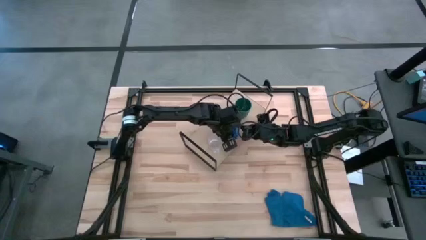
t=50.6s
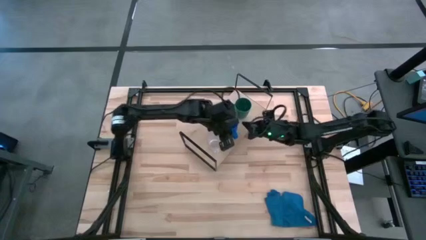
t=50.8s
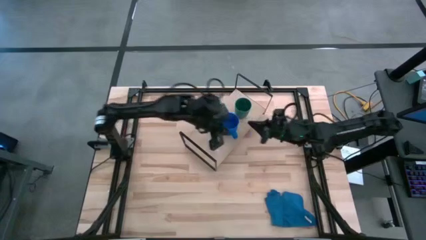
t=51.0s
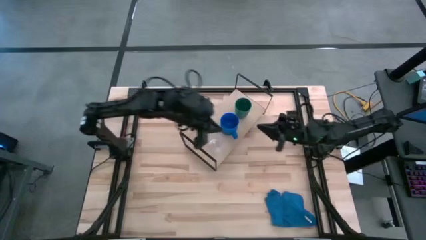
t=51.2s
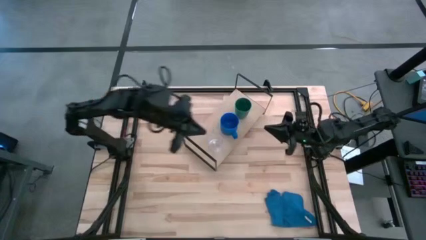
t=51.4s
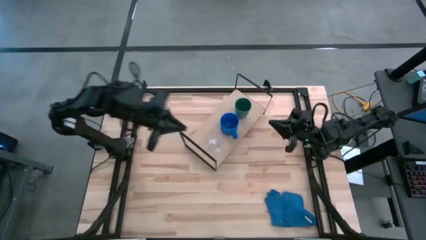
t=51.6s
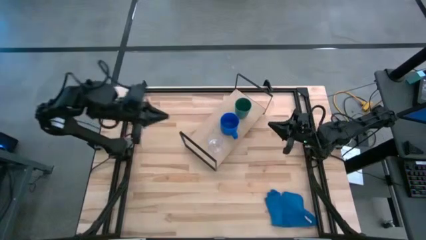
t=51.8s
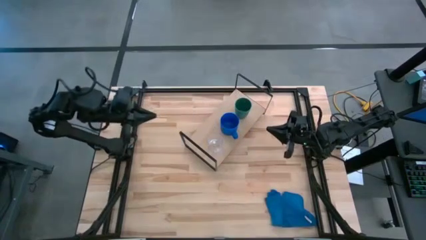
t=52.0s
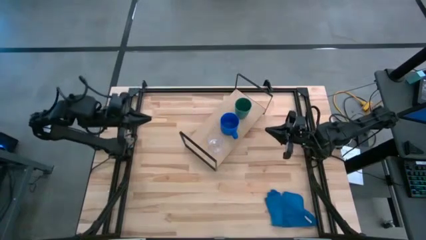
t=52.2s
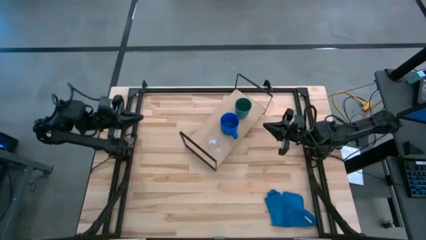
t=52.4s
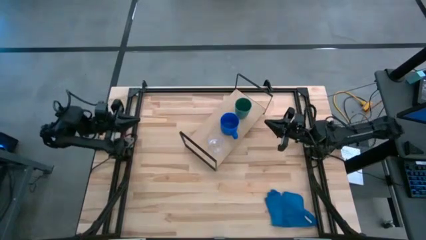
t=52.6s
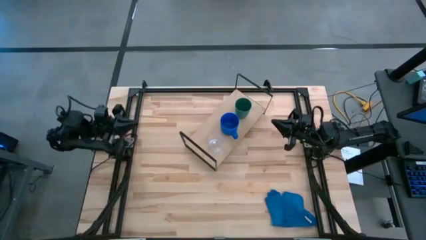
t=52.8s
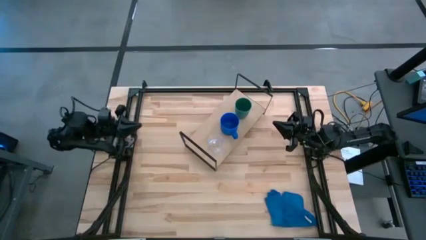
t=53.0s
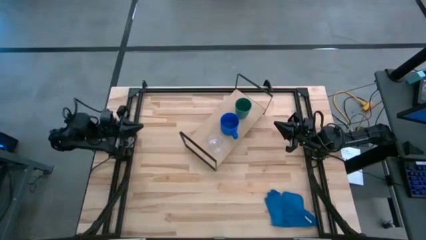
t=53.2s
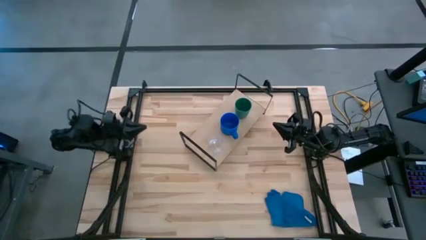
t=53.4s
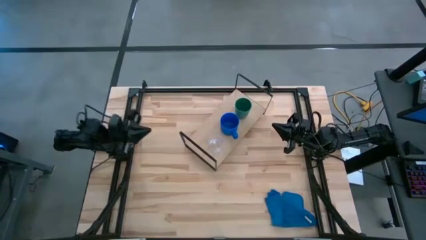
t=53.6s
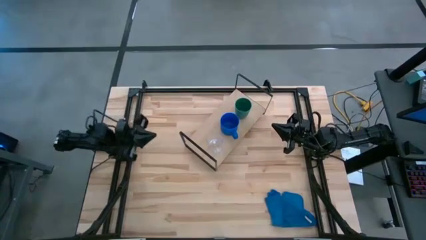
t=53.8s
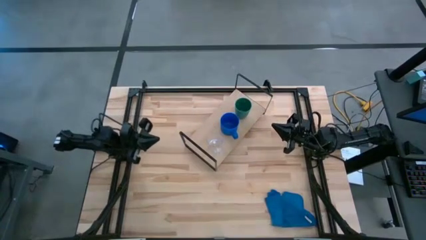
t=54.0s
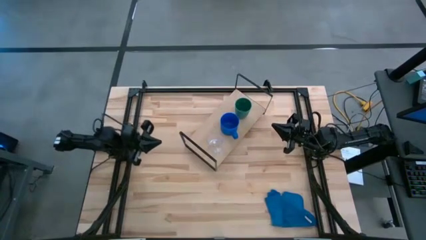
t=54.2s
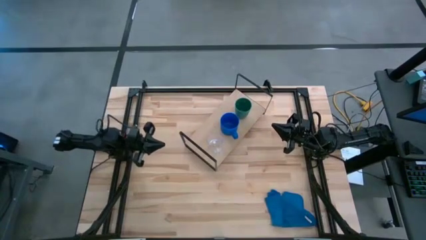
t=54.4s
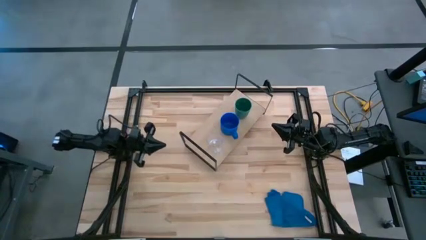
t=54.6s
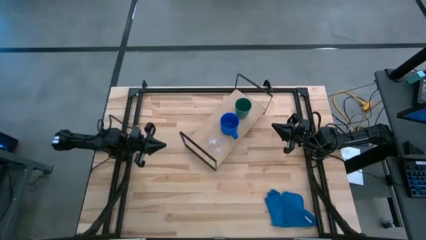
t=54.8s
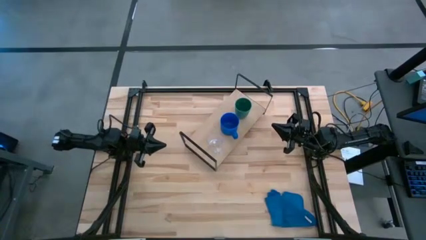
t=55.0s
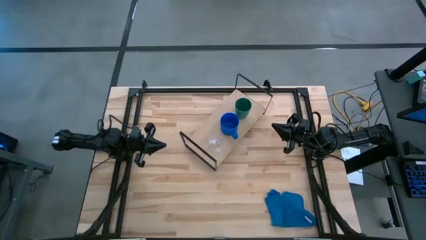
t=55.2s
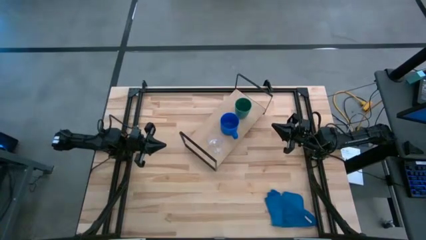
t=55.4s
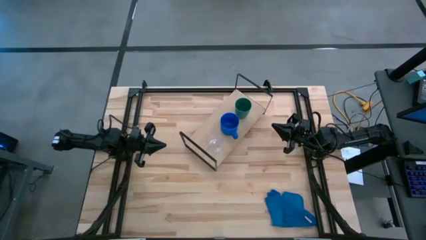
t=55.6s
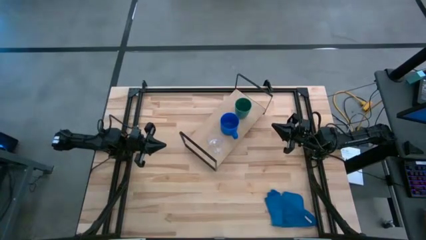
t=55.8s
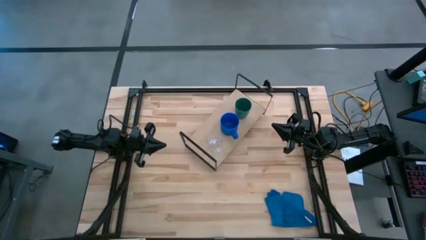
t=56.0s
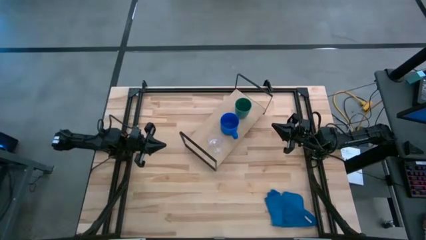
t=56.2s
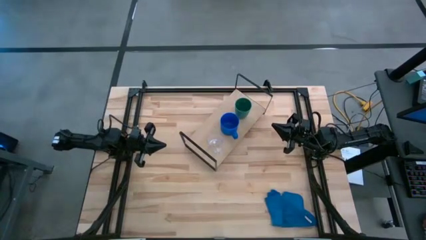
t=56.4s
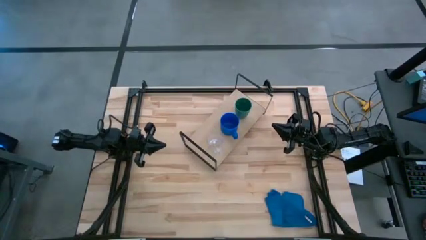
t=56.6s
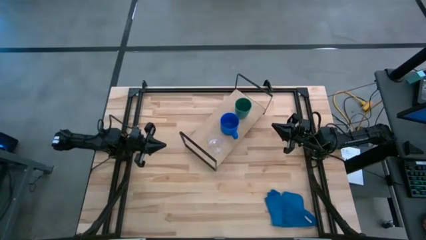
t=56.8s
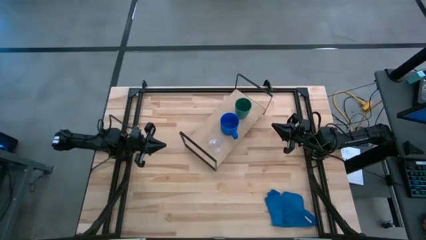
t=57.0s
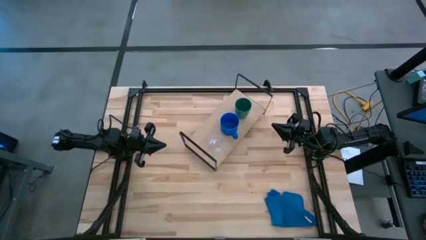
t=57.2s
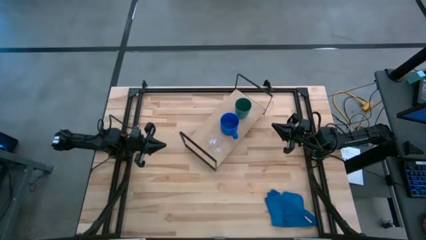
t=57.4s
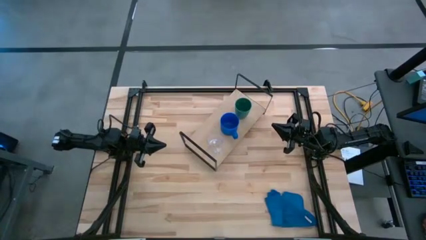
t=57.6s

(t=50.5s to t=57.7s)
Task: Stack small to large cups/mugs on shelf
Return to Home Position
